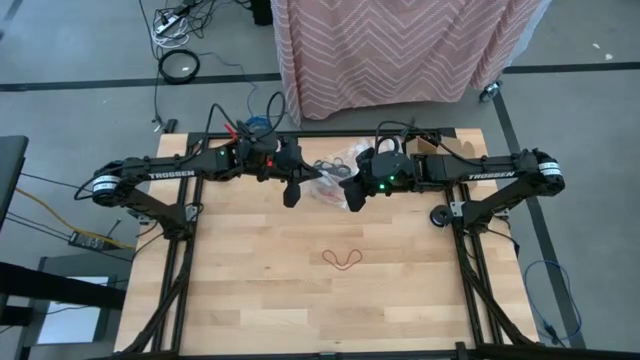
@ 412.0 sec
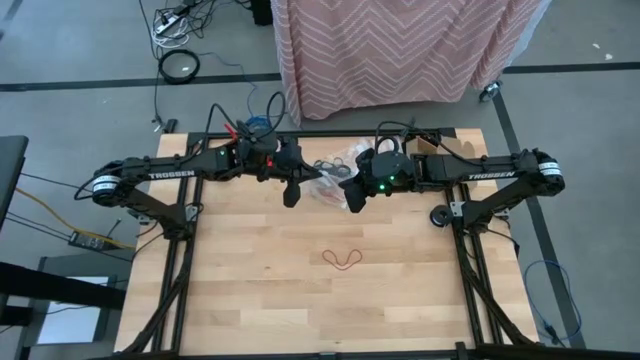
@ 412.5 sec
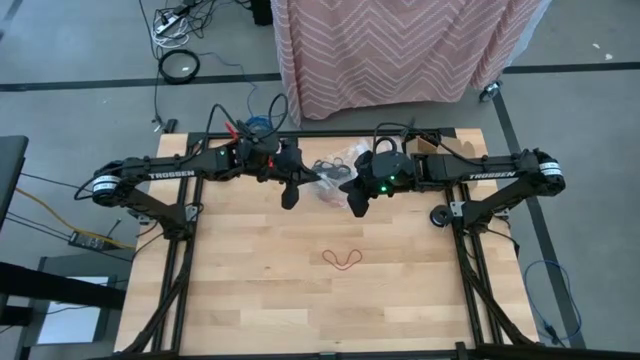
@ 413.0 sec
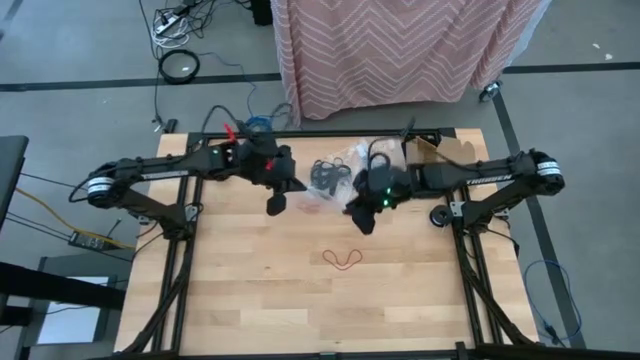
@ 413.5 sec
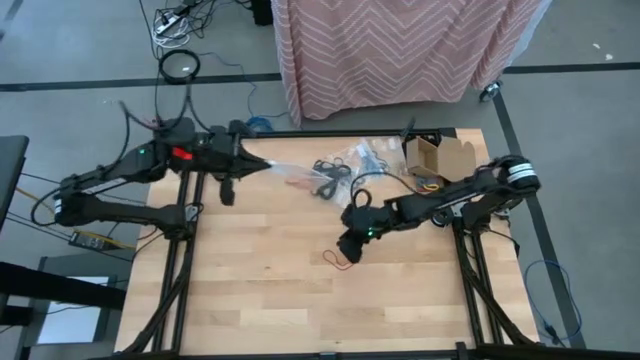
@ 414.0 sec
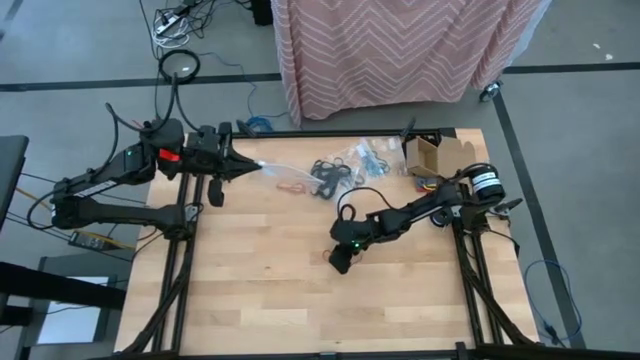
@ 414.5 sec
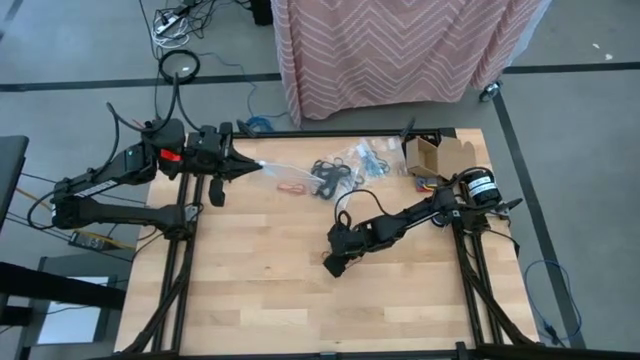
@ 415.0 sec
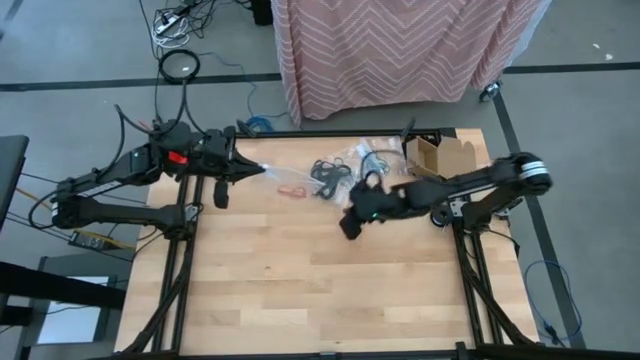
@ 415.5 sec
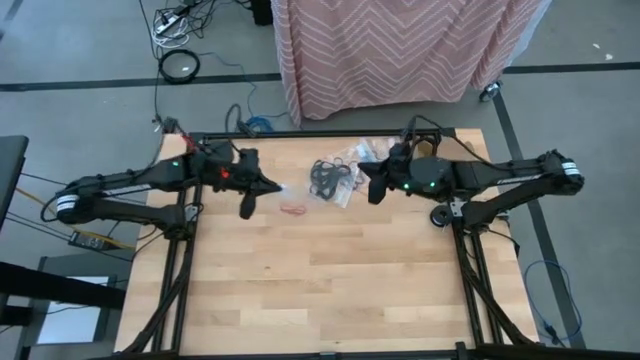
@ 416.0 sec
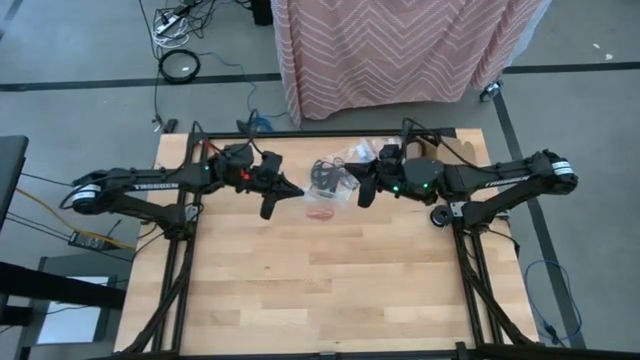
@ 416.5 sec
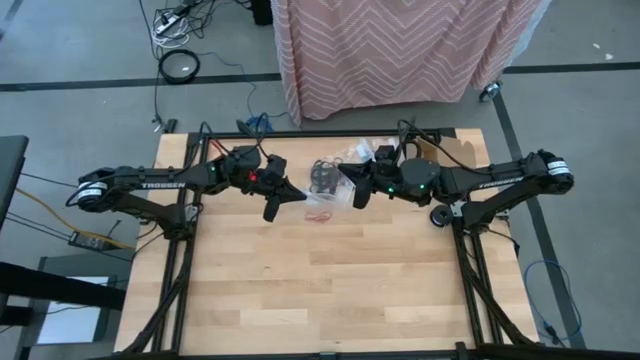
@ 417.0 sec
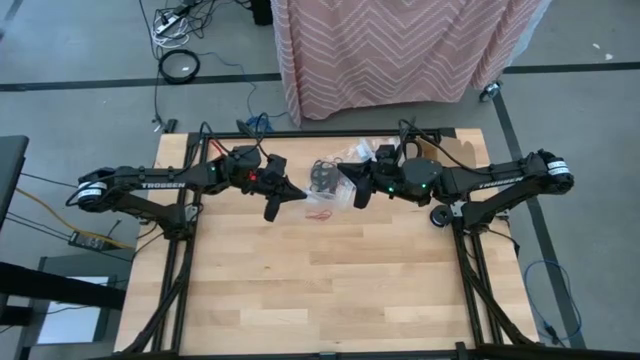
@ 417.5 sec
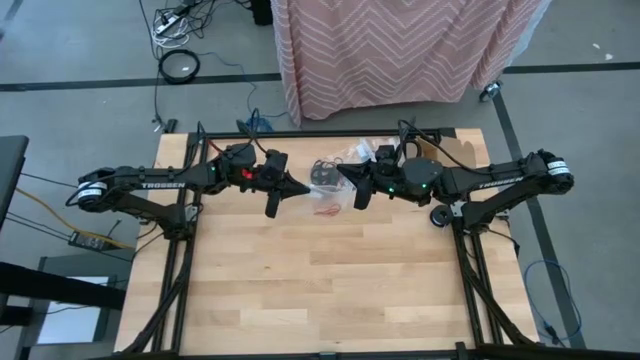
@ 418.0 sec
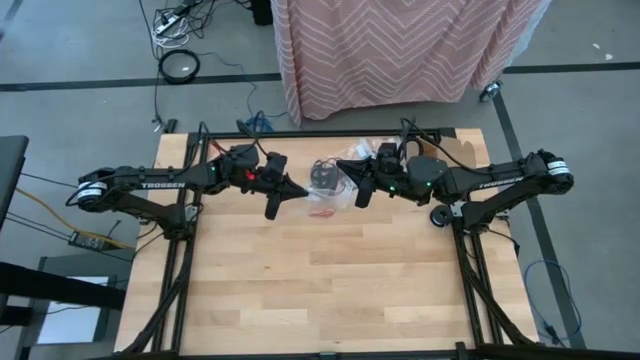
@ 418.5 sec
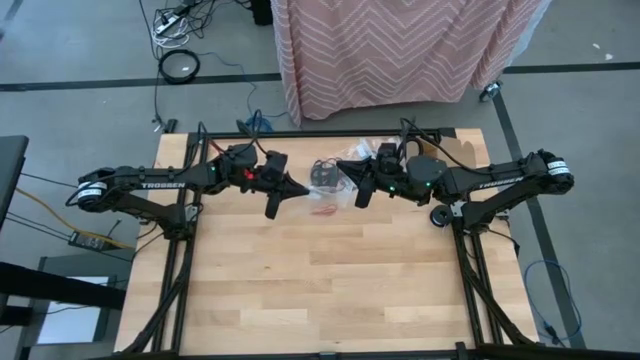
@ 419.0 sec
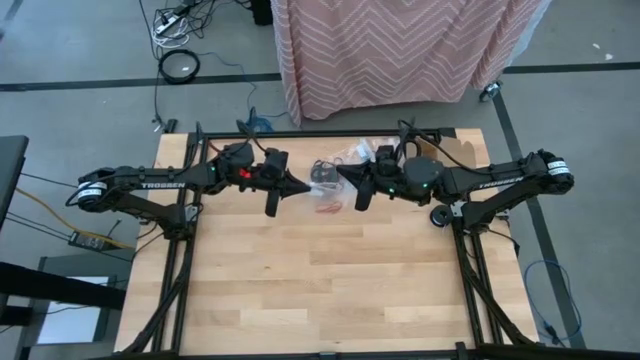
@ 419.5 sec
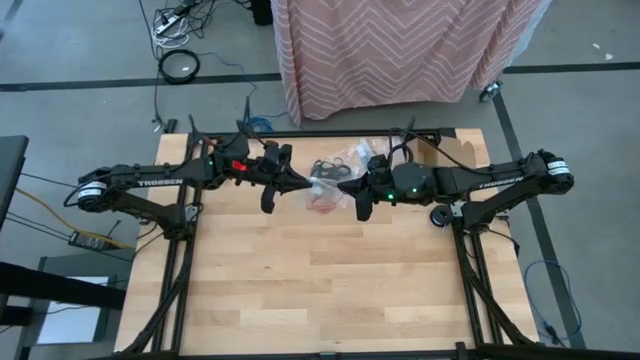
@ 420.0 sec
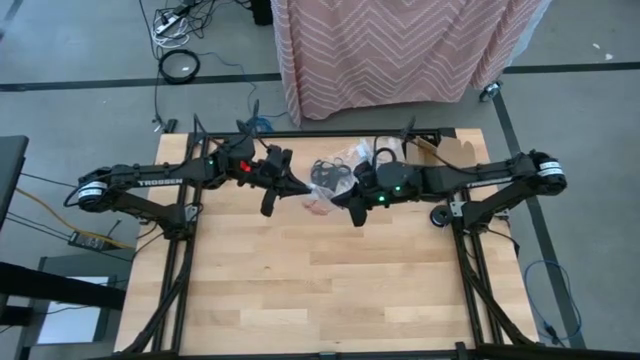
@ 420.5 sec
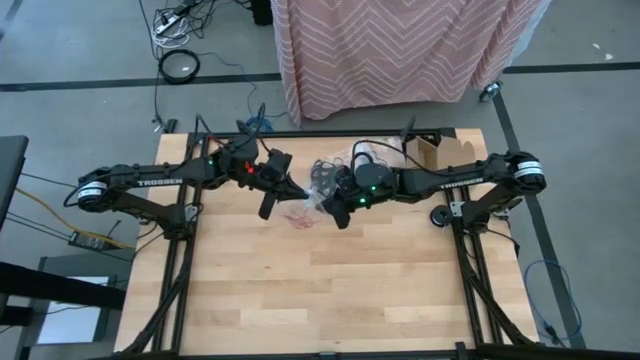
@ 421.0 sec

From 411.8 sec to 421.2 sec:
Task: Sort rubber bands
Put the red rubber band into the transparent zip bag

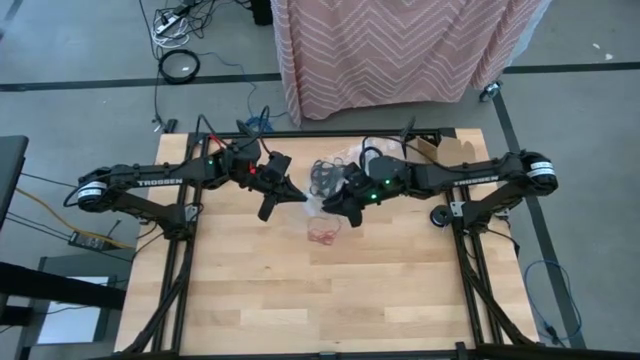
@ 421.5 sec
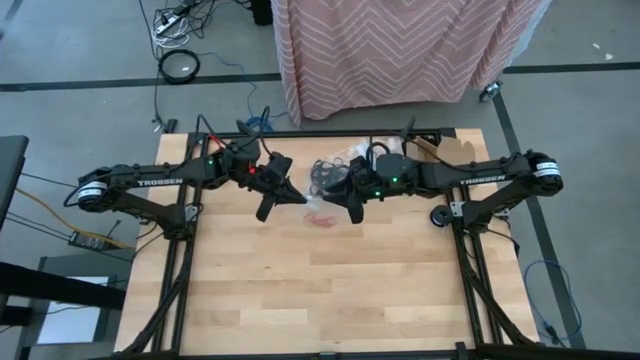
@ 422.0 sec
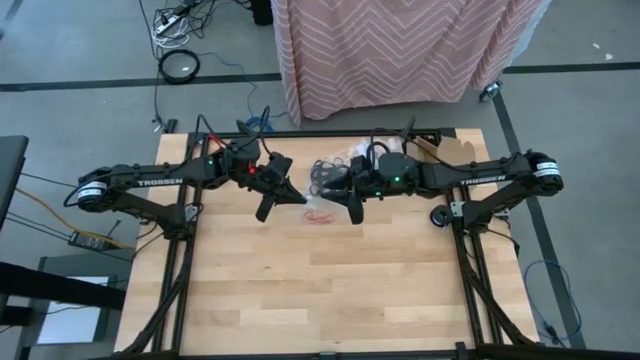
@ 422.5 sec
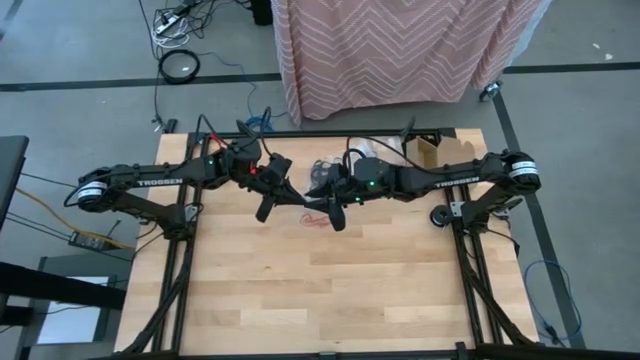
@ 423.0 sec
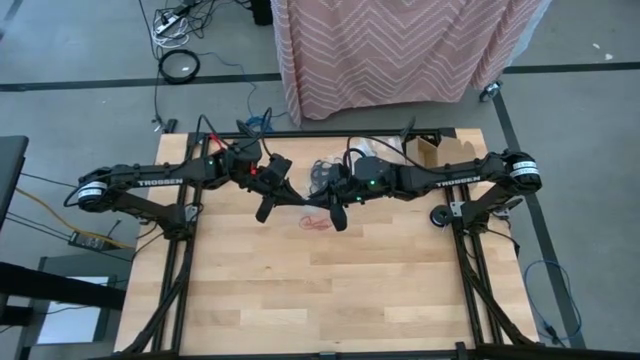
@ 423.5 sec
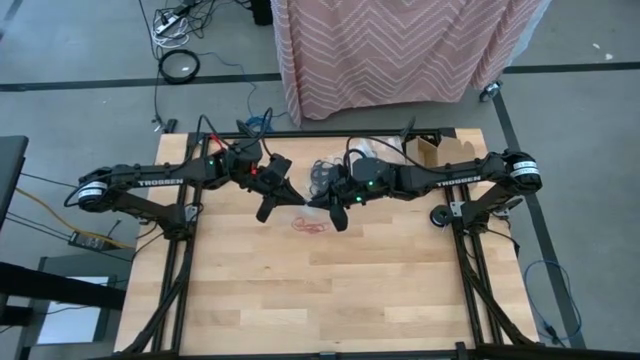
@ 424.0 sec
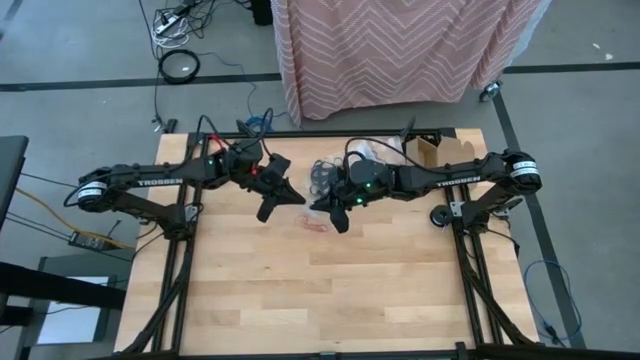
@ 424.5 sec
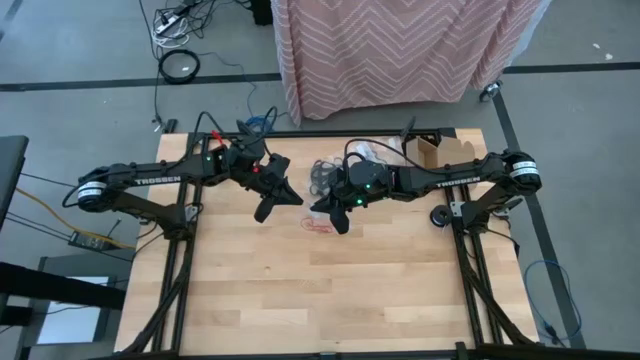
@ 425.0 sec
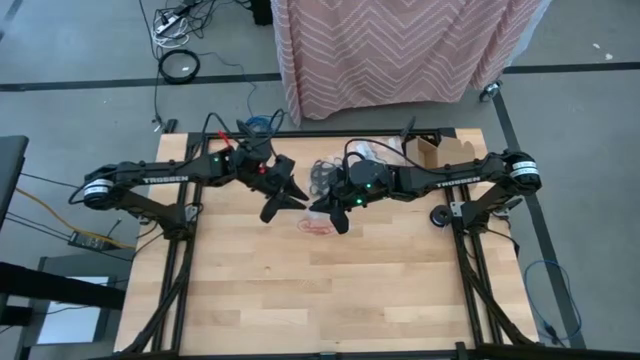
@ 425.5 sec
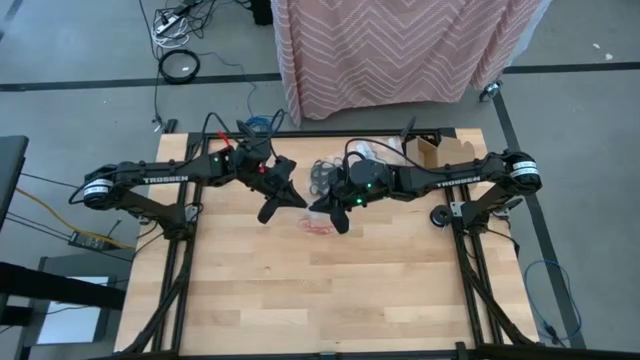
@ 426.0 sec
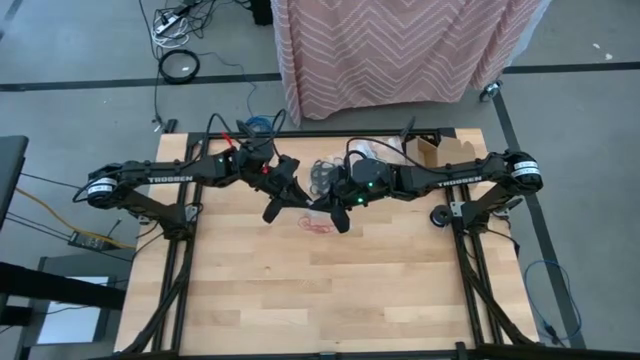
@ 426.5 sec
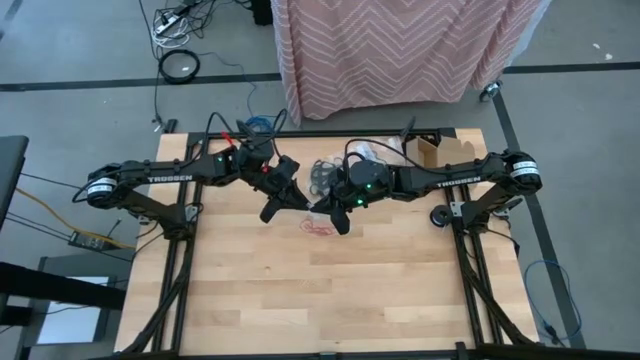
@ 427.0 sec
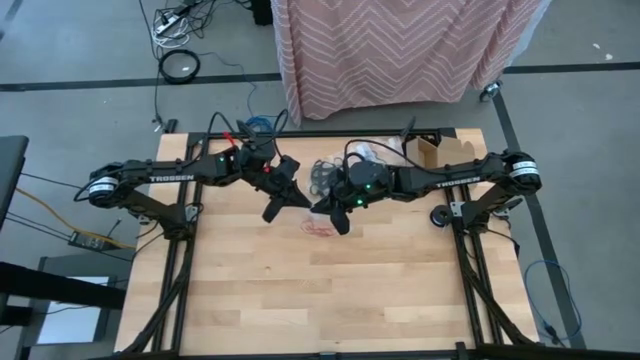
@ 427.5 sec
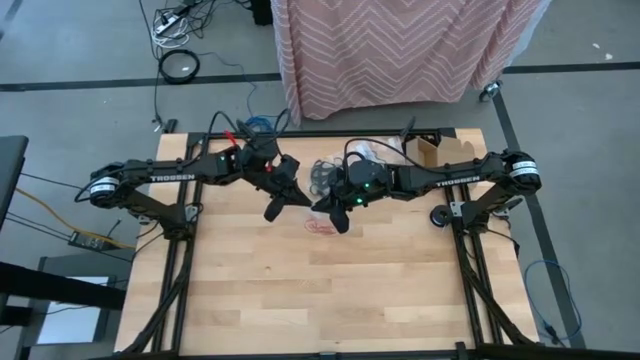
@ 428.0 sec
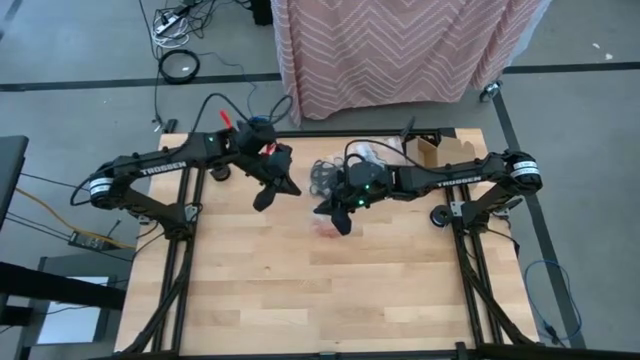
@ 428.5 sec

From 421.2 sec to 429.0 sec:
Close the transparent zip bag

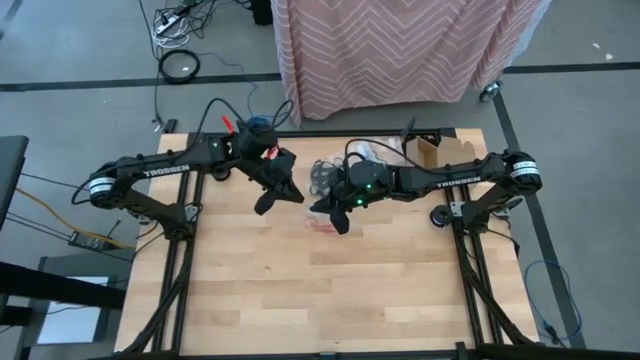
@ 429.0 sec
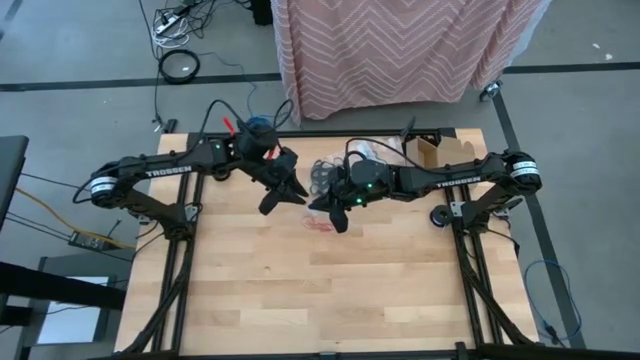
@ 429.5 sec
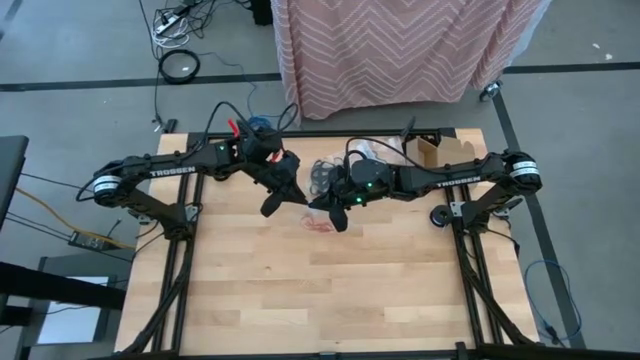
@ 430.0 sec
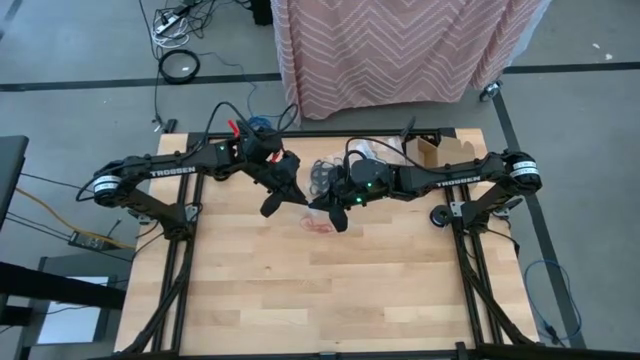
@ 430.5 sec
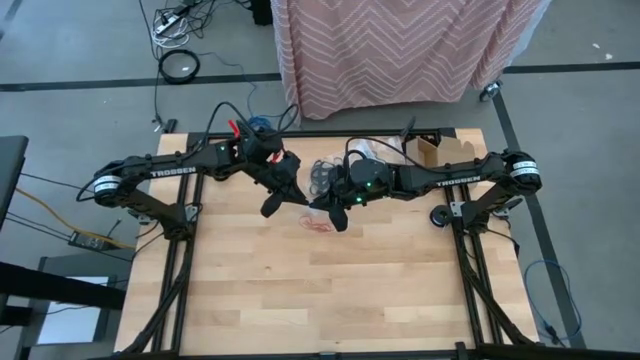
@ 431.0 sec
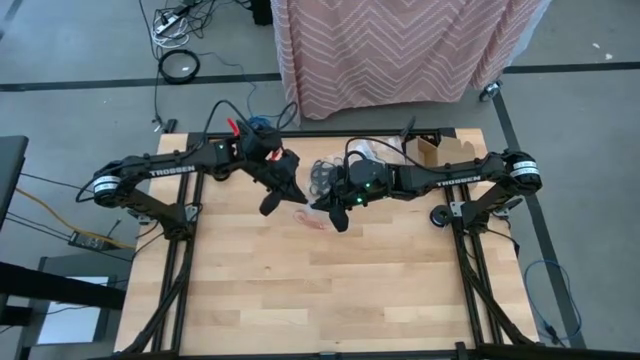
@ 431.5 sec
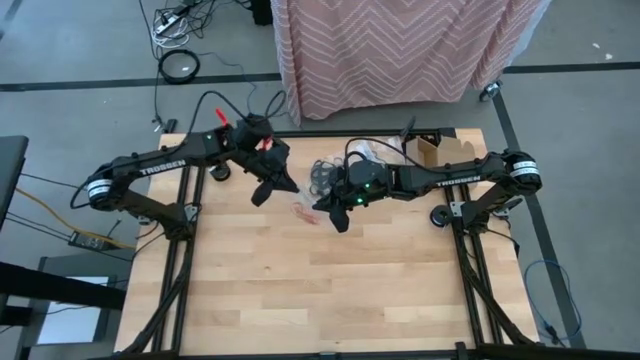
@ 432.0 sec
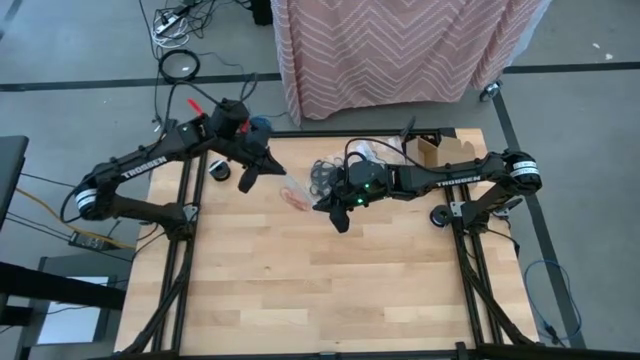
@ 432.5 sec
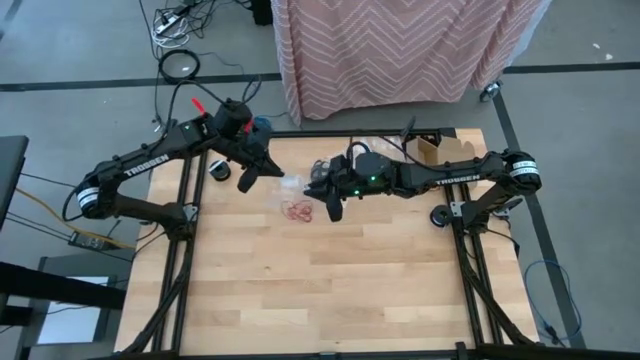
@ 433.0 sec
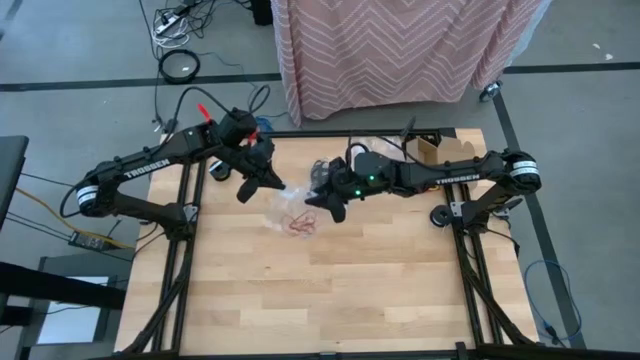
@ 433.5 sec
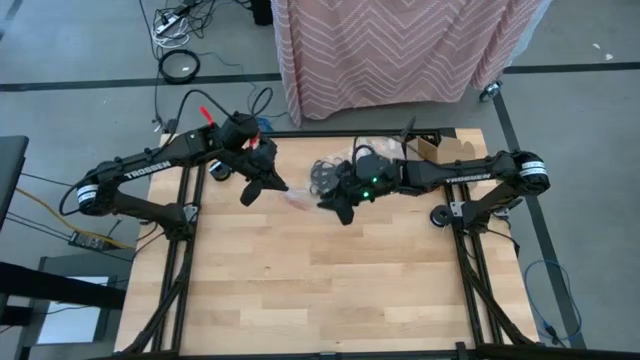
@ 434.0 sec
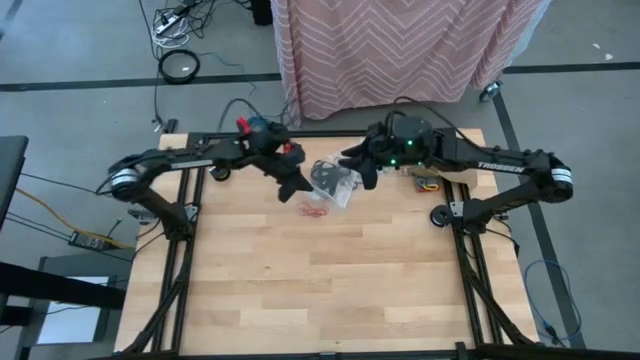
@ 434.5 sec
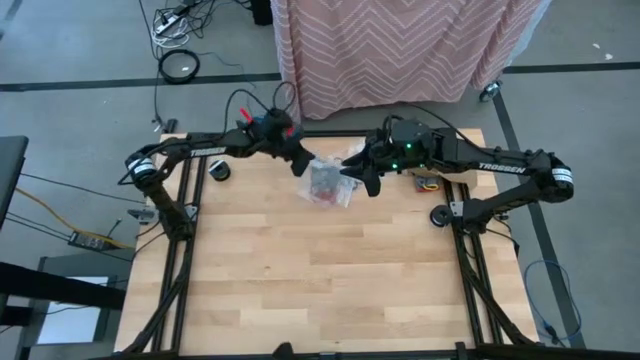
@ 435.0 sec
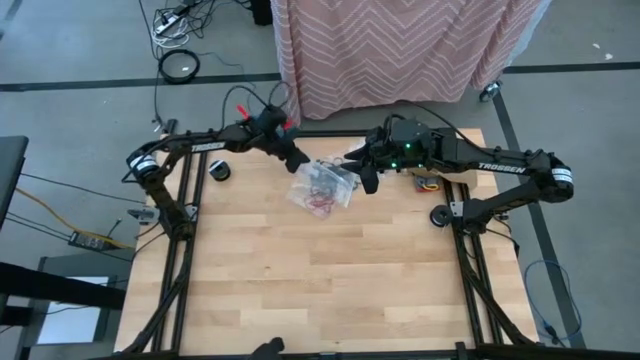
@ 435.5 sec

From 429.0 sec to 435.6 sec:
Close the transparent zip bag
